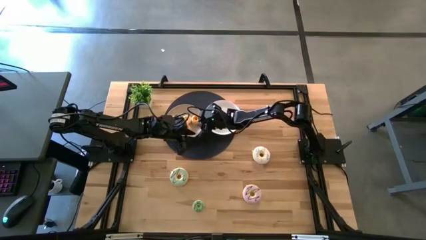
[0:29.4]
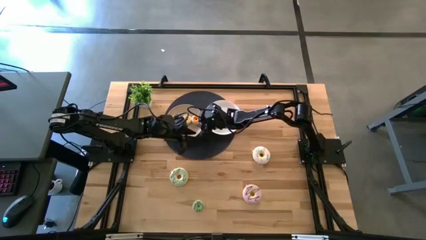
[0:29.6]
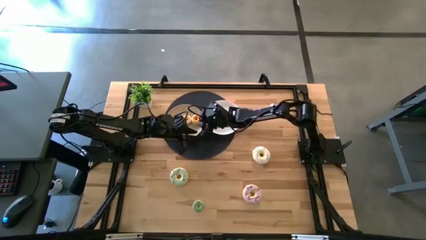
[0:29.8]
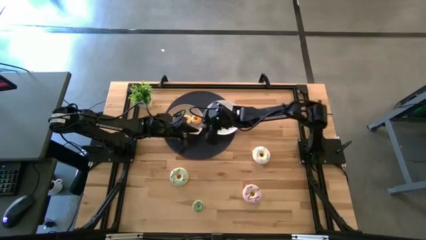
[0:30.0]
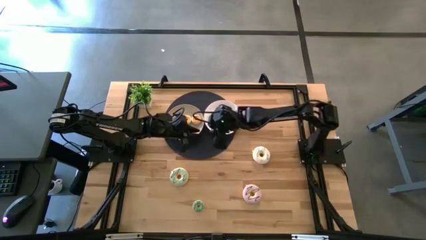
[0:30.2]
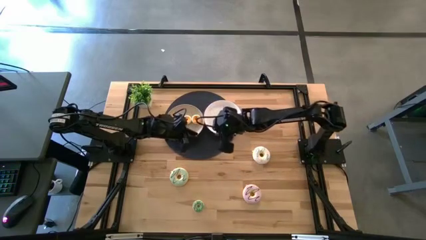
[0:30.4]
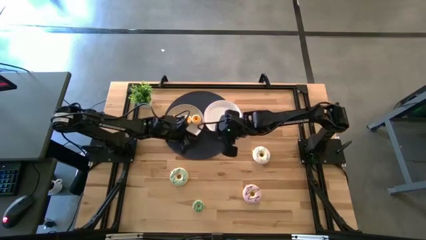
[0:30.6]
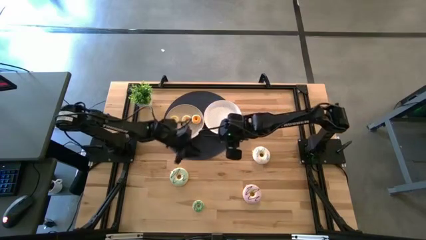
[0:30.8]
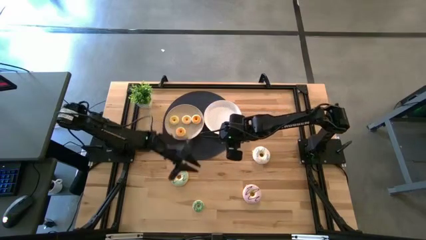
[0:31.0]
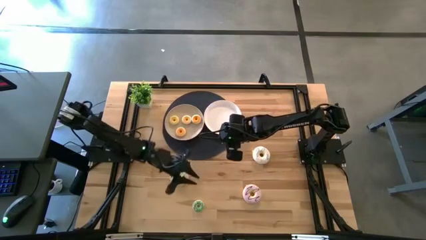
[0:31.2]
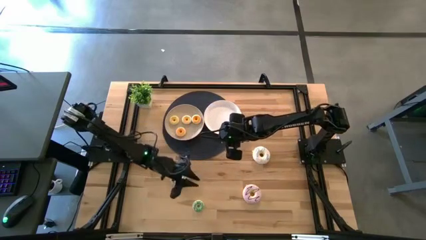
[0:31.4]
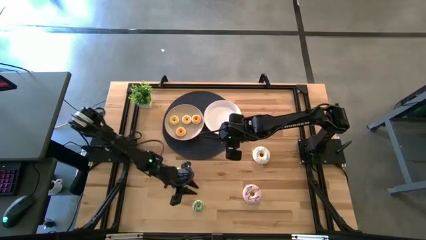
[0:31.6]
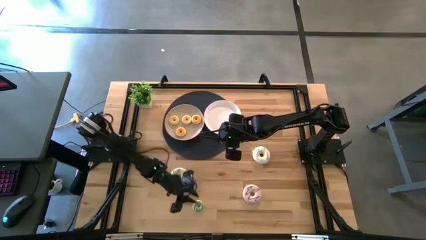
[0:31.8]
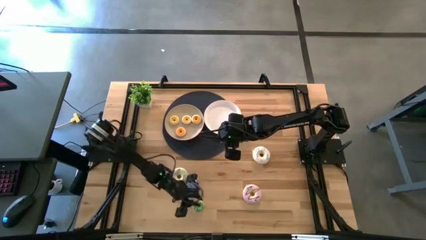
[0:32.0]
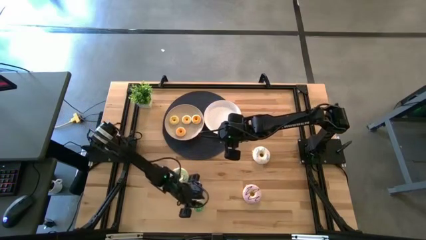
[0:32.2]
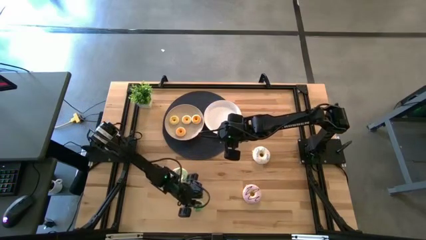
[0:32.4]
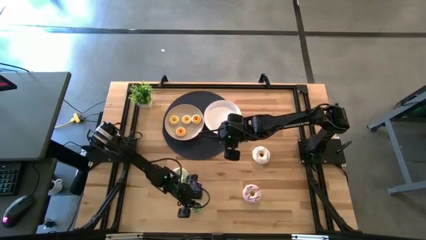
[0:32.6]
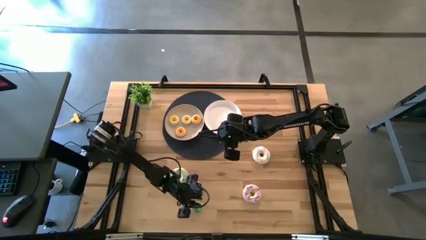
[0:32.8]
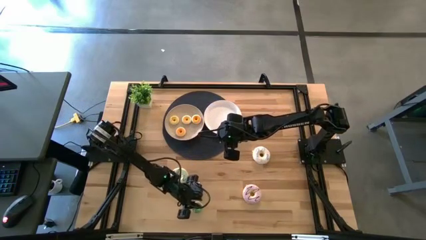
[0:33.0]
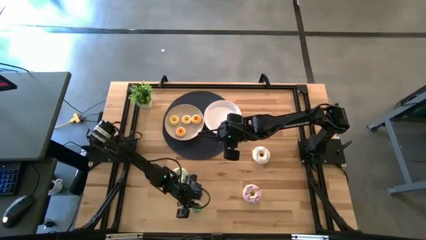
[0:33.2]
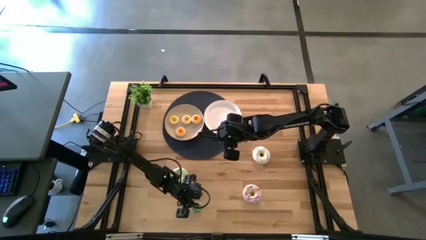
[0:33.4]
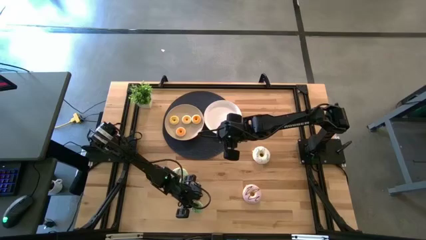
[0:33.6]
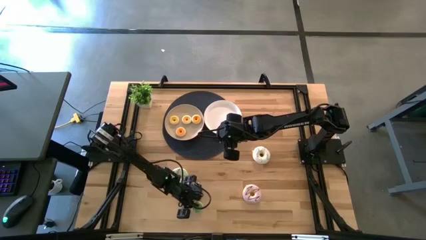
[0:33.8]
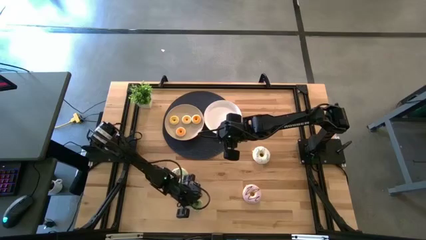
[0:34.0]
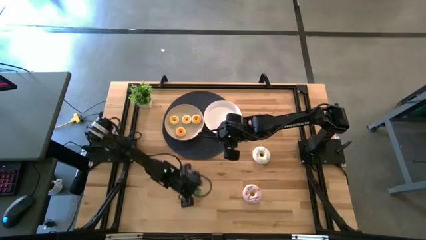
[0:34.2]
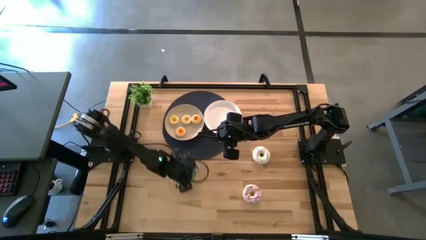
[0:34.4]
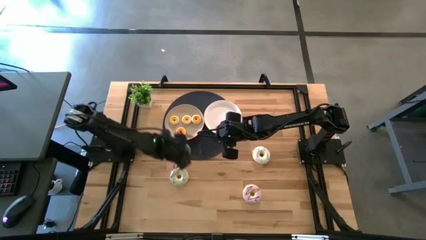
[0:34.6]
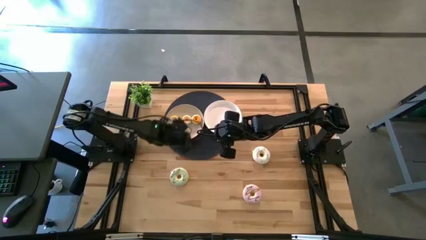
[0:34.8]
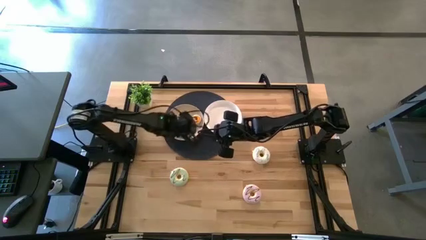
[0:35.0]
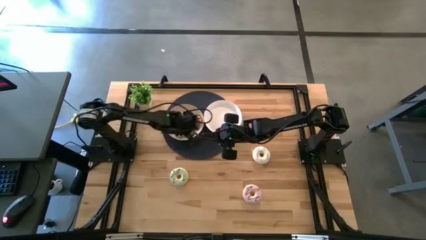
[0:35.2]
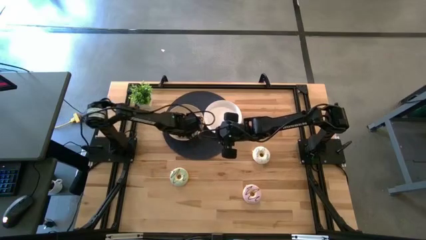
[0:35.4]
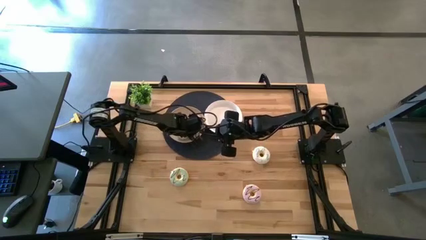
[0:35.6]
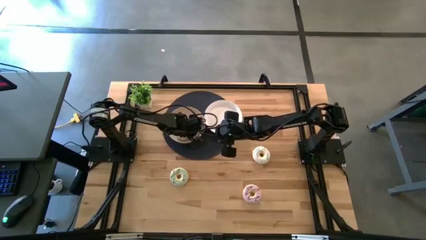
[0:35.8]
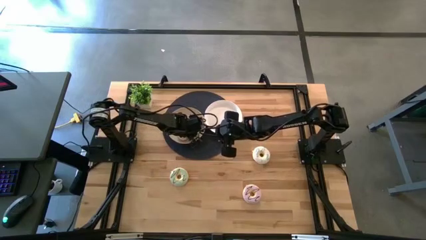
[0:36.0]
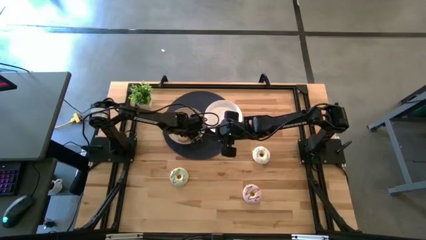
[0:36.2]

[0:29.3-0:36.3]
Task: Pick & Place donuts
Put the small green donut on the gray plate

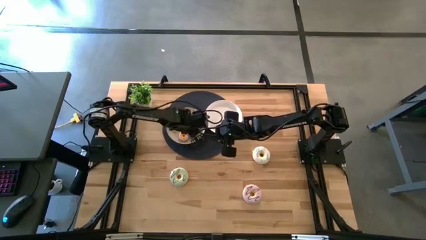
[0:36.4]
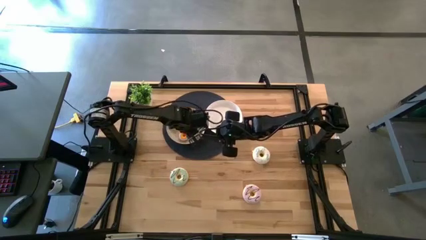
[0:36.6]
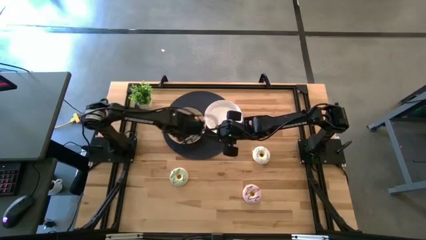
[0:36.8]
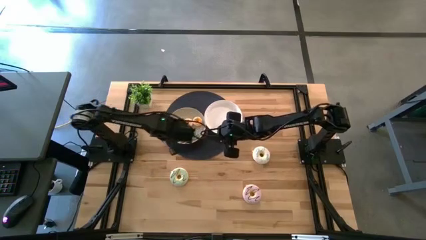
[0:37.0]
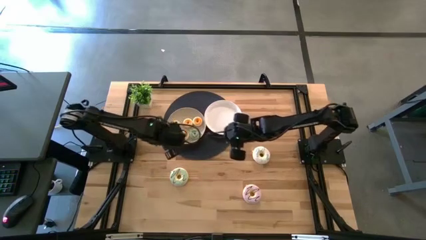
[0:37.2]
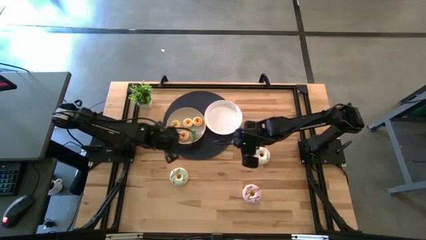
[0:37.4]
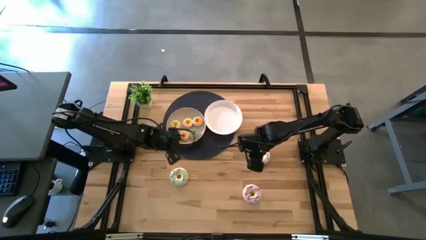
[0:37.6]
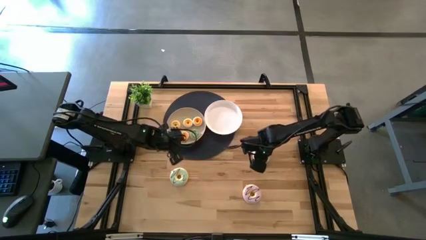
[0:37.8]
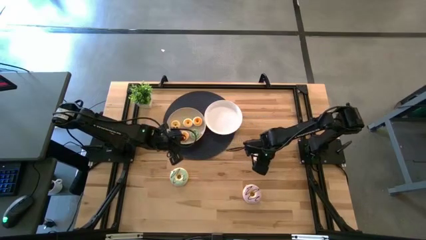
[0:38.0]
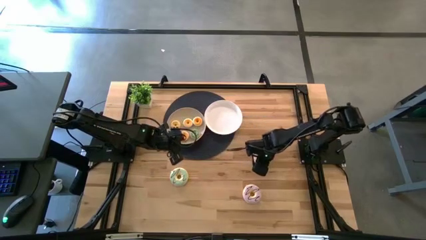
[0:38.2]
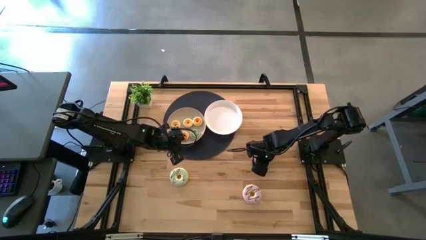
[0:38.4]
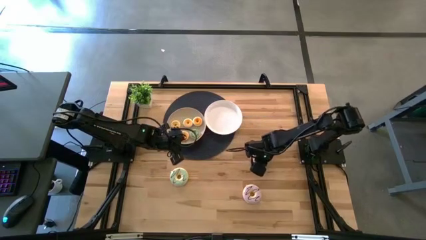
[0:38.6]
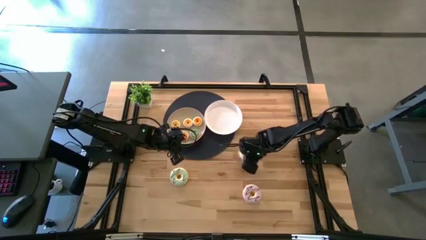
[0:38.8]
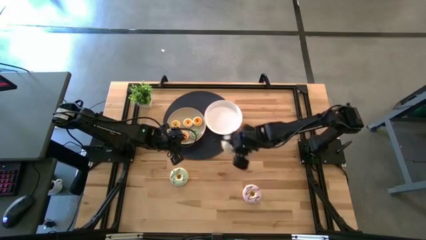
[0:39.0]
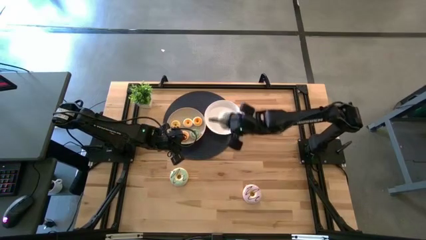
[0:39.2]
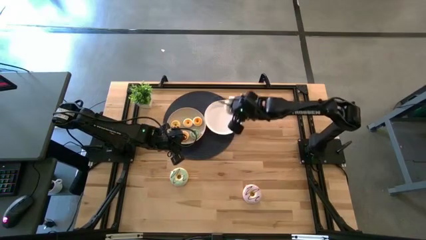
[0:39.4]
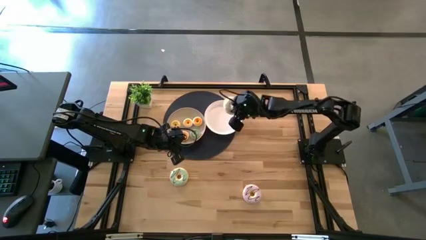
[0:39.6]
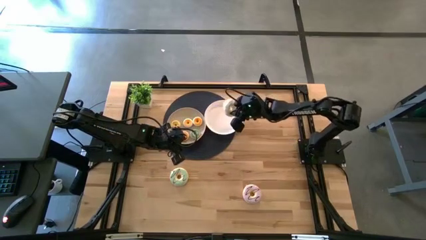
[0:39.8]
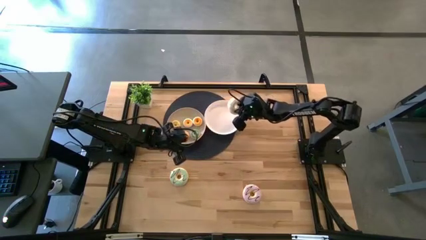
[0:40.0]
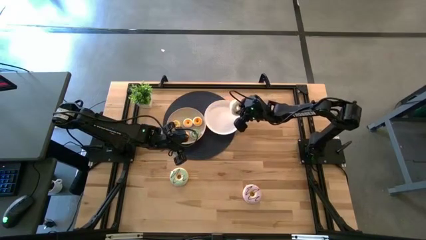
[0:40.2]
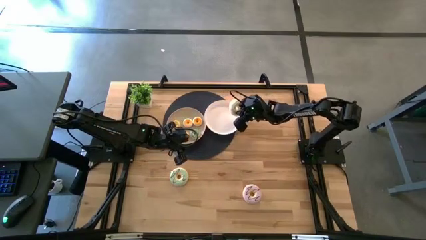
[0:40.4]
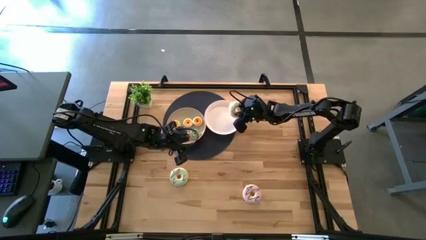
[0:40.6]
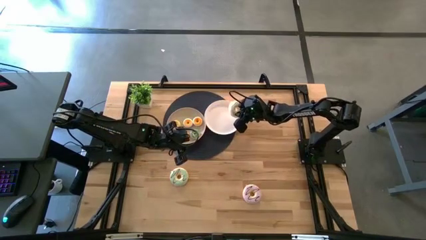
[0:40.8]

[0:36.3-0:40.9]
Put the large white donut on the white plate

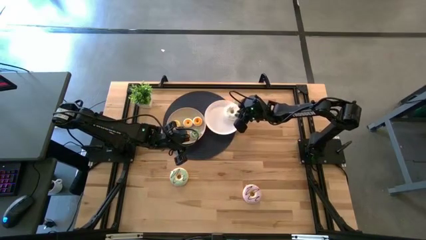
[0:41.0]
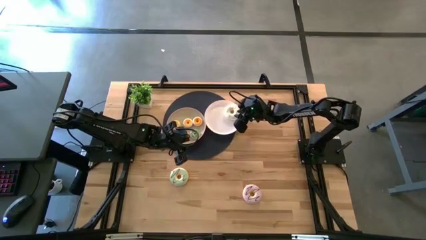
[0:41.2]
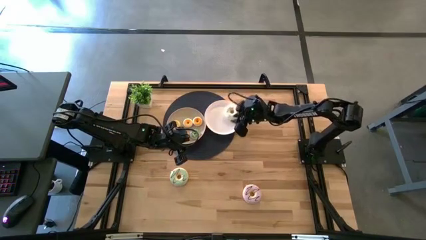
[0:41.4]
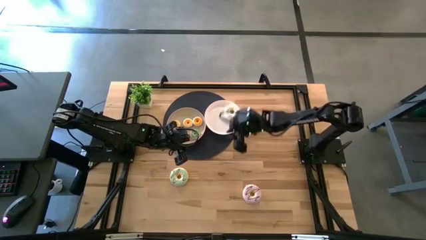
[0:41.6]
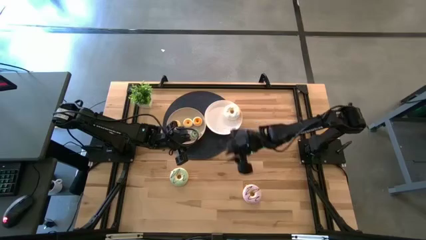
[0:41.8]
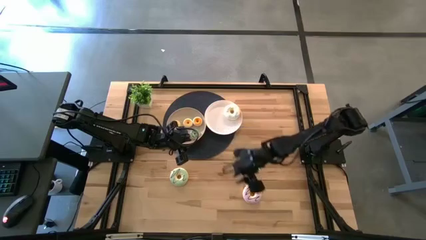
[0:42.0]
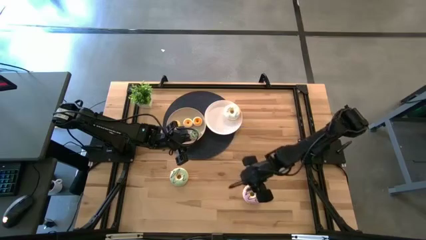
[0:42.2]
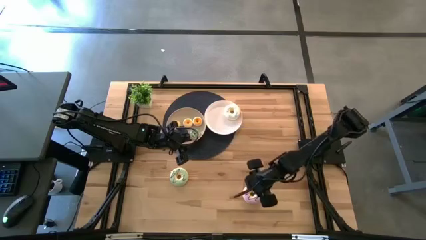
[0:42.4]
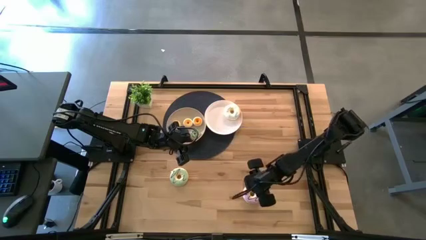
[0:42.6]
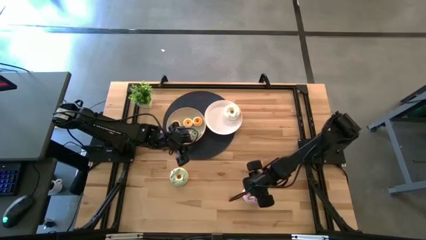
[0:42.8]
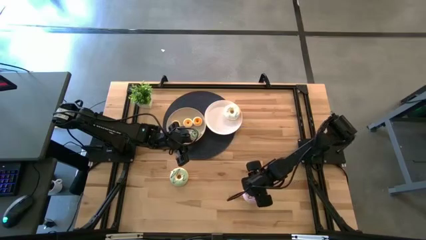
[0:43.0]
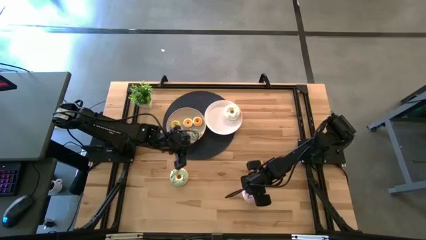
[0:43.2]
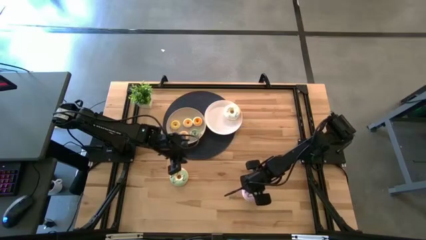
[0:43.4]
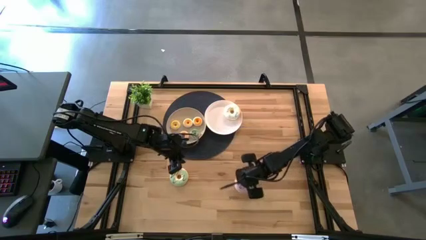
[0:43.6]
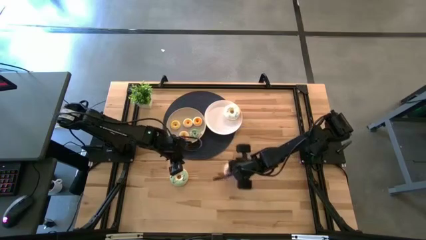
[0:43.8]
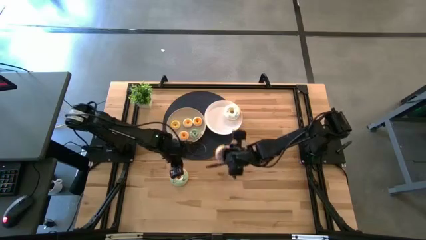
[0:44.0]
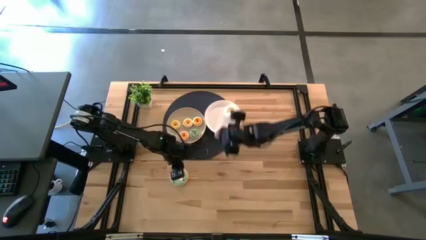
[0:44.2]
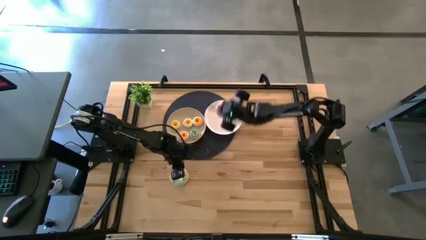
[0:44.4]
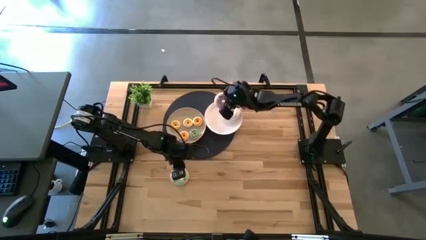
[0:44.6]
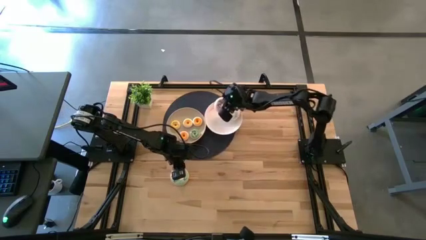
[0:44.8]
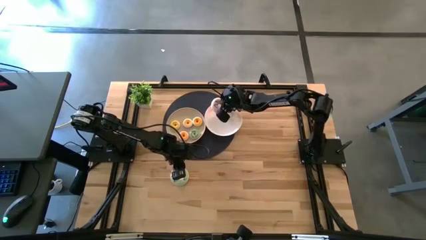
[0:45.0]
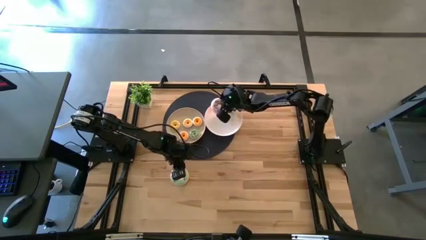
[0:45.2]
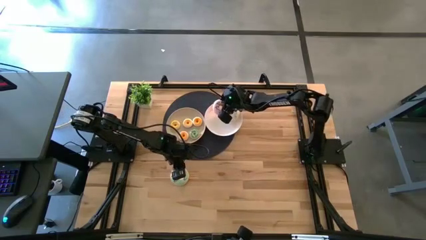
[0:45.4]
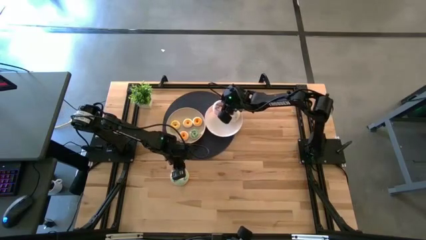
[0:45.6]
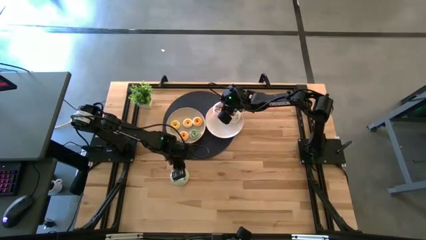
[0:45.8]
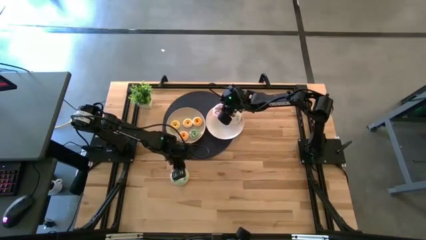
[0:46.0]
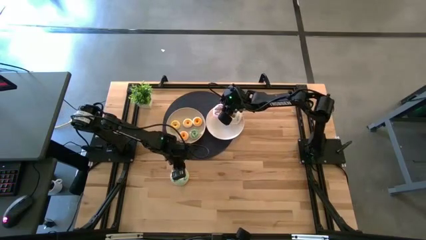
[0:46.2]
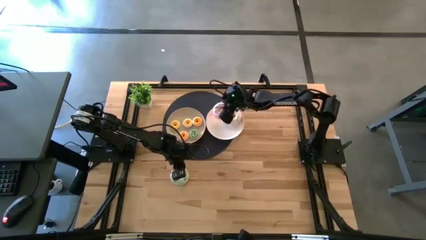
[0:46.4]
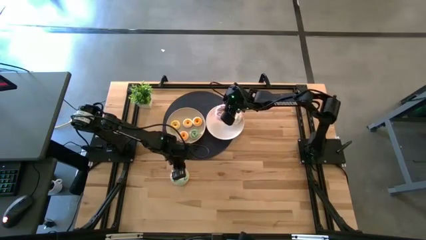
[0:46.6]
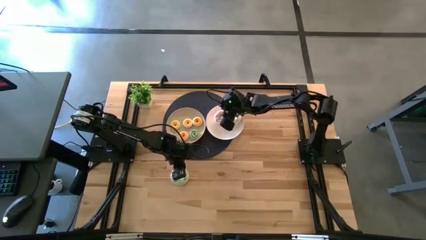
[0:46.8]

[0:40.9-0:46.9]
Put the large purple donut on the white plate
